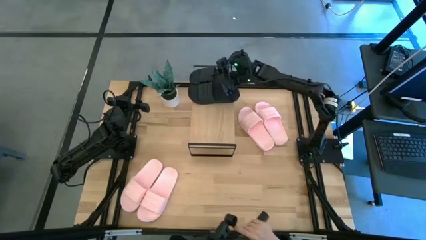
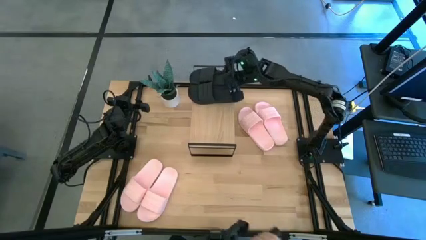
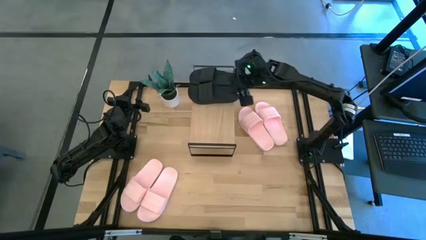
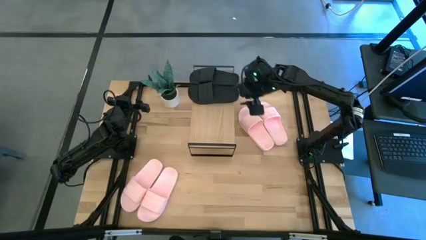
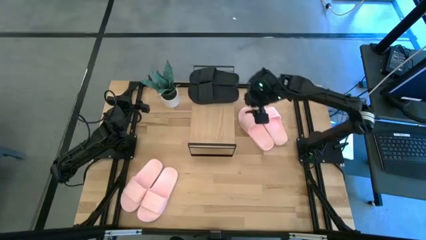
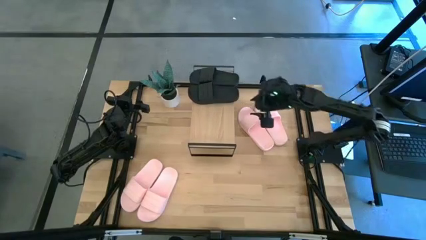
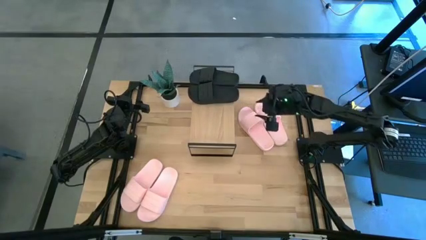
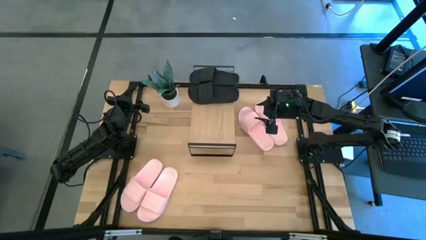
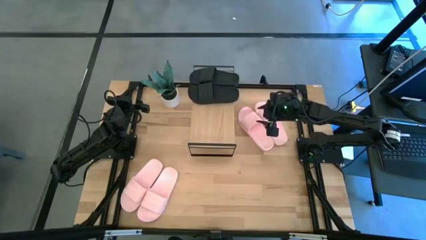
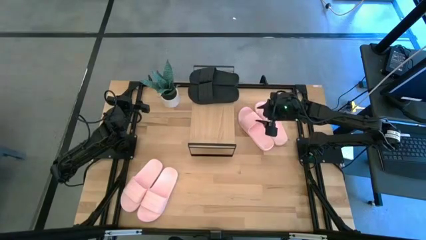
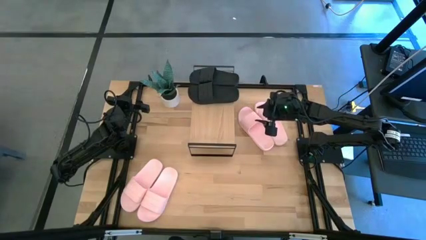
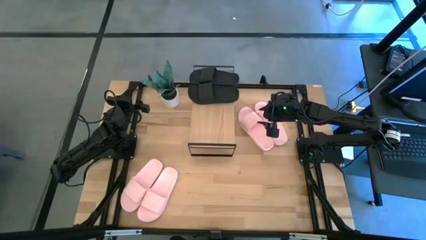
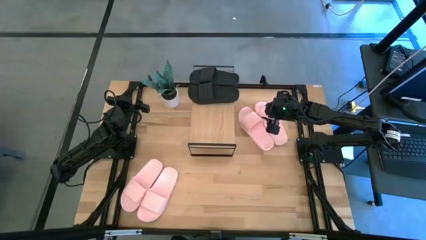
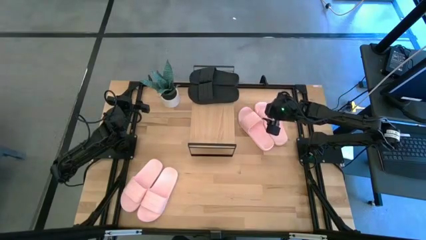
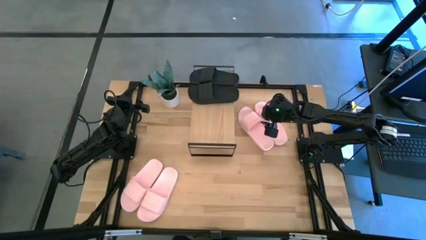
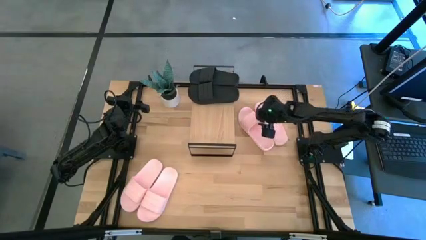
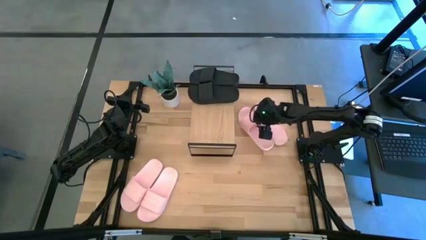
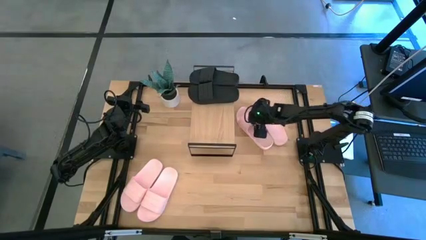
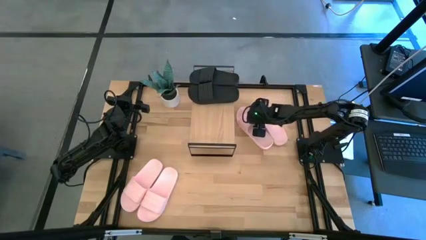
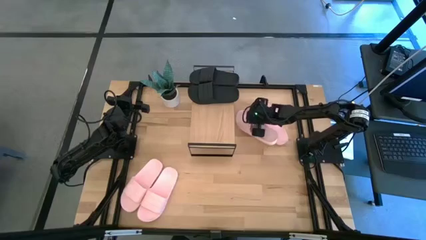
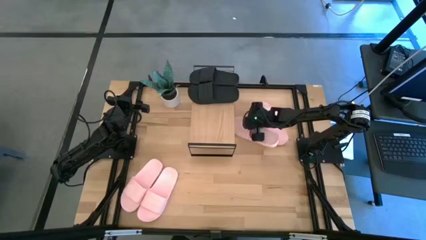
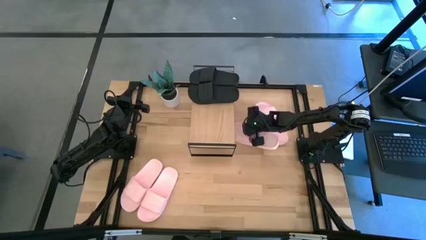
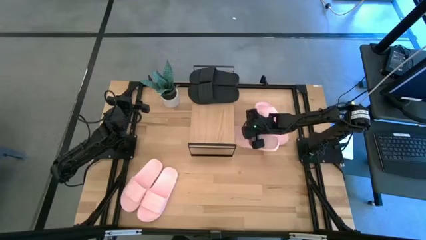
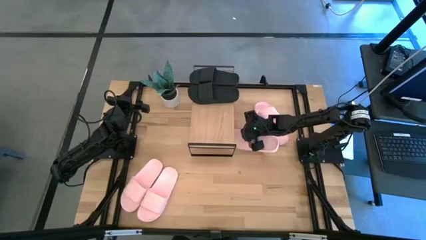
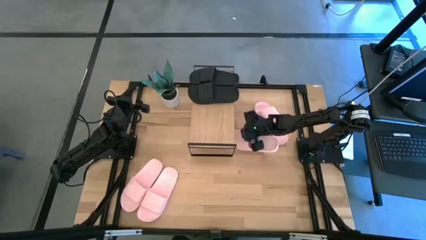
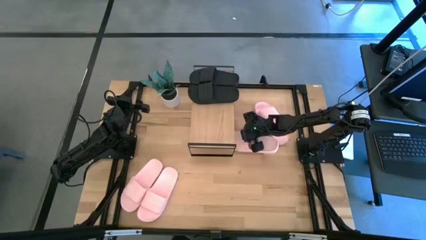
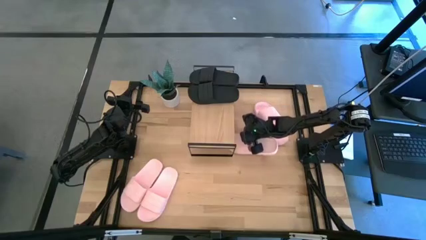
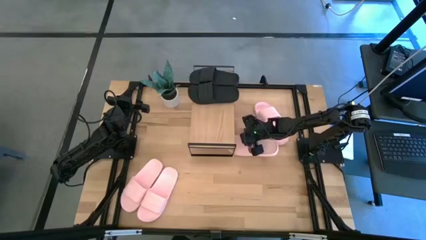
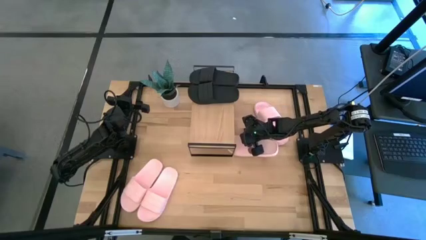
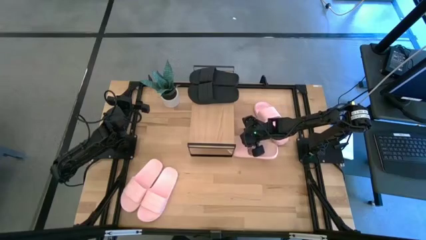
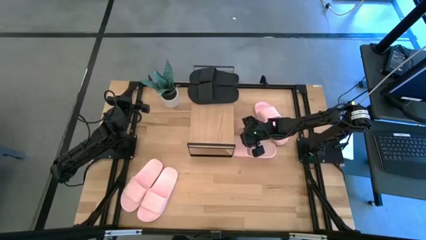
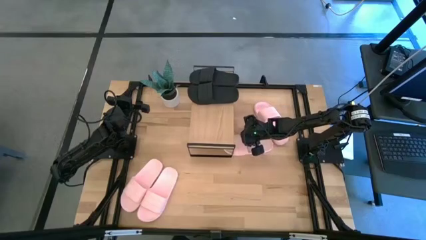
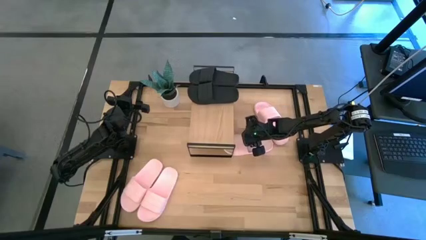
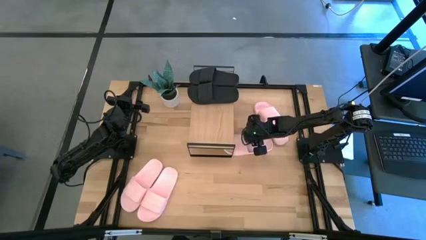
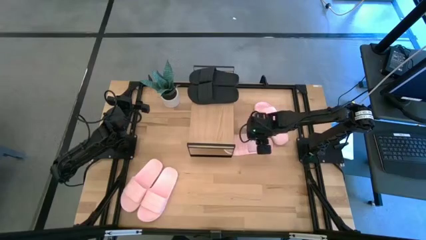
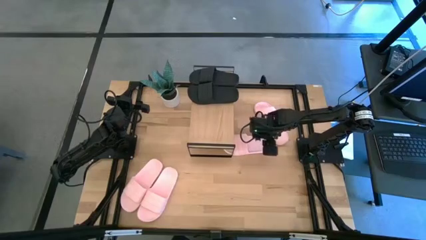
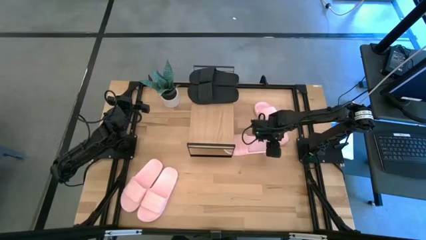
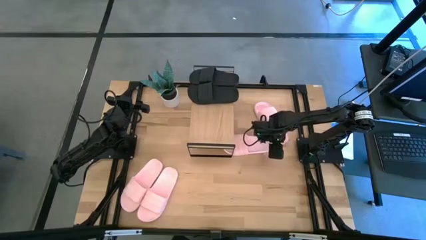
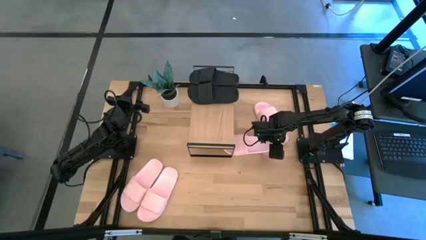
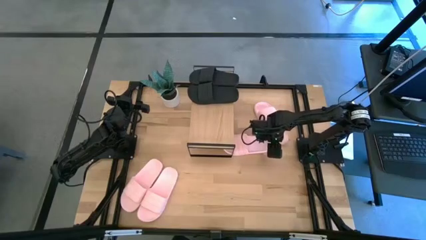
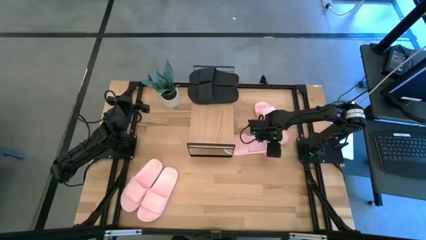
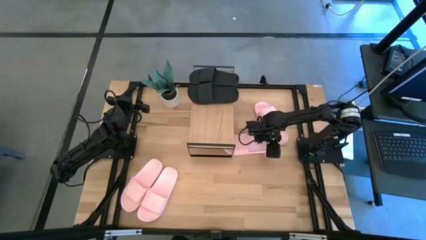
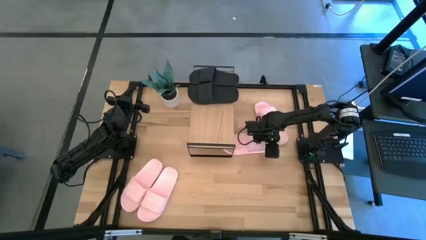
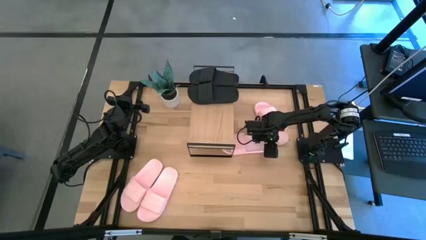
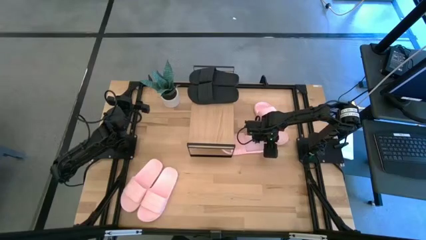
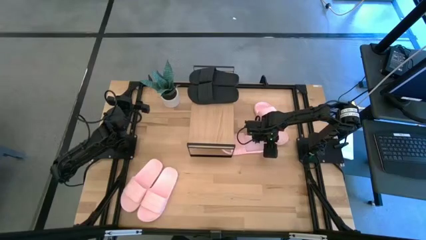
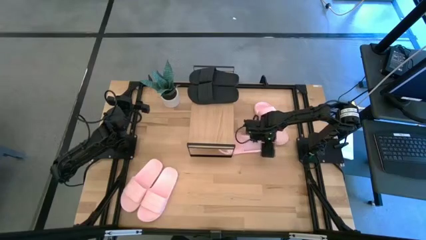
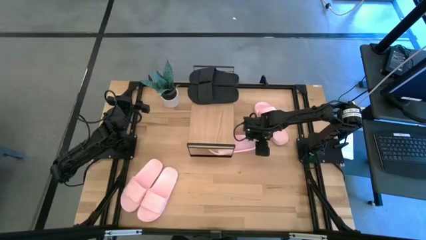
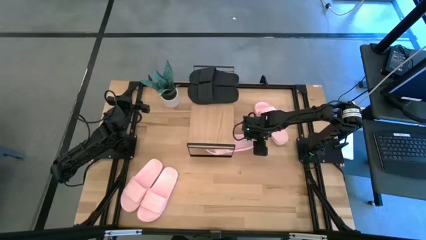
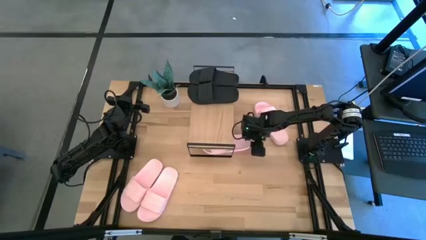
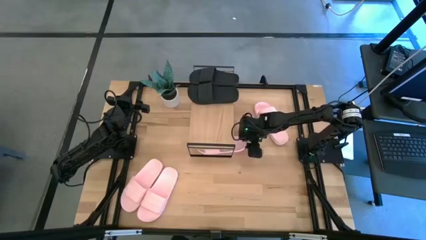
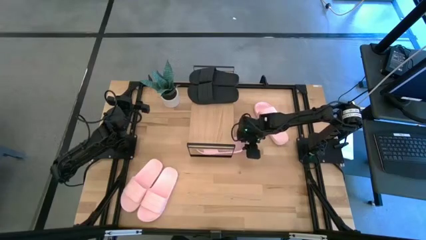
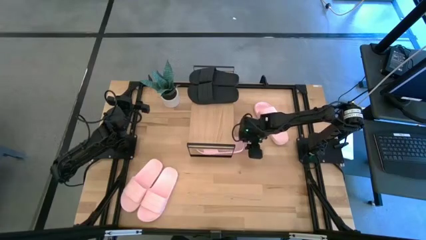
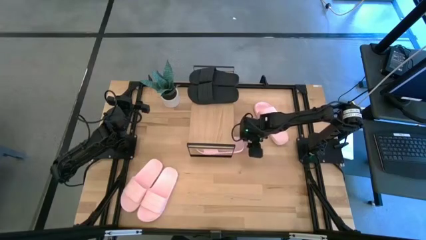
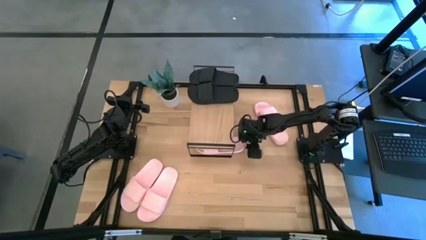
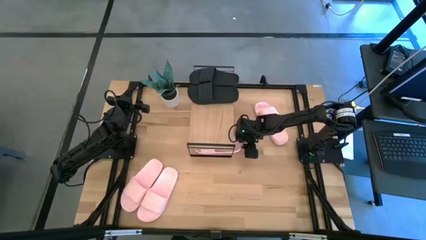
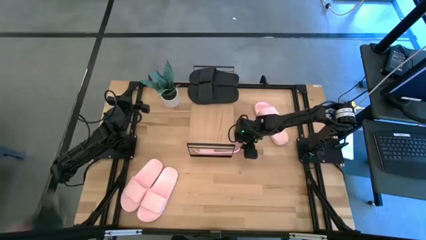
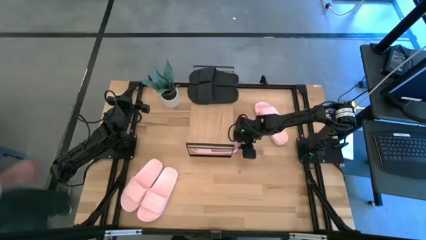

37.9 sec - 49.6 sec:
Task: Pick and place slides into the shelf
Put the pink slide under the shelf
